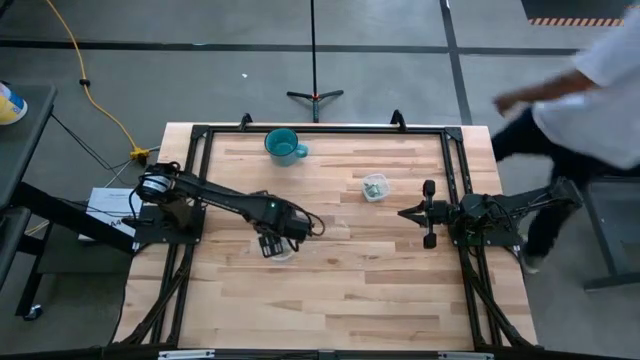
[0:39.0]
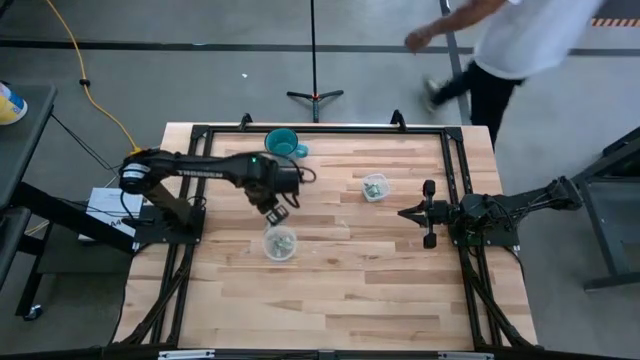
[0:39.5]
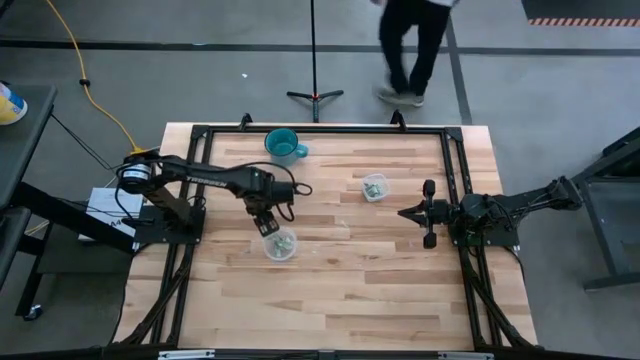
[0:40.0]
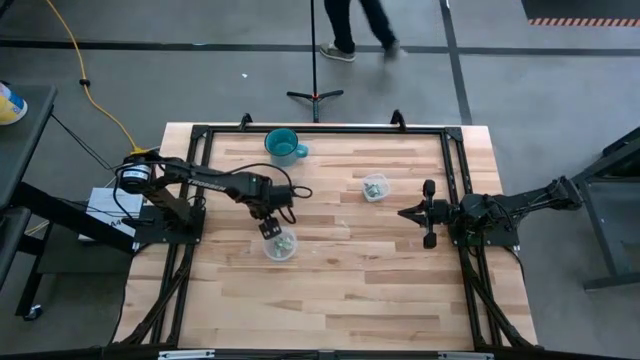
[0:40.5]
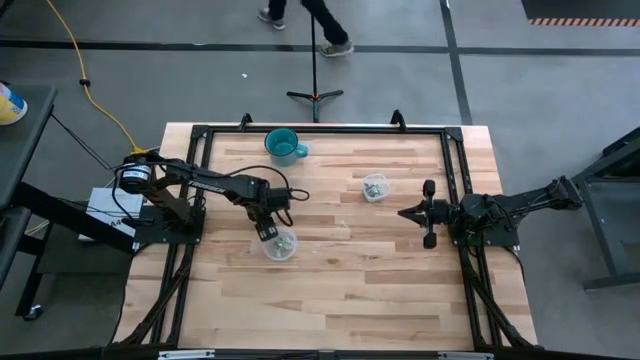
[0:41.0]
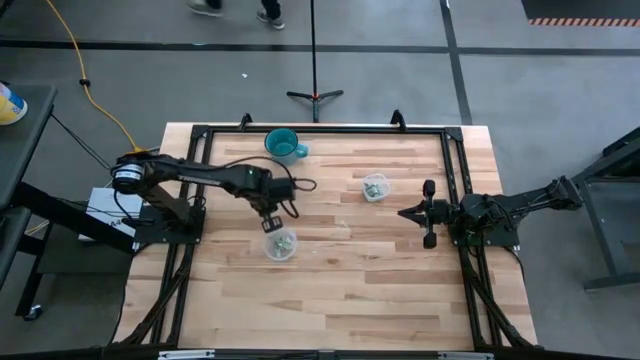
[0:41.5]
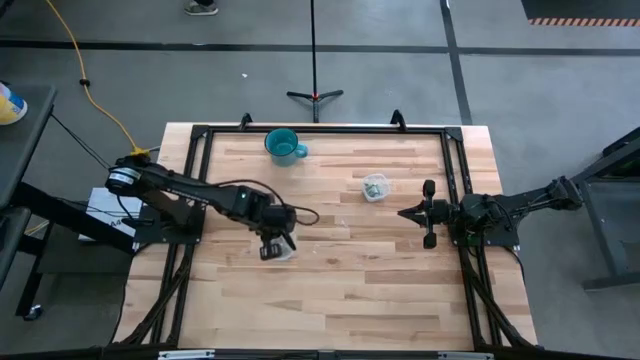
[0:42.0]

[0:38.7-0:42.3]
Task: Pick and place items into bin
Put the stevia packet into the left transparent bin

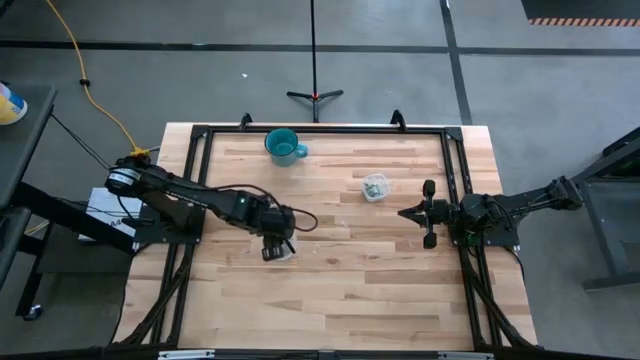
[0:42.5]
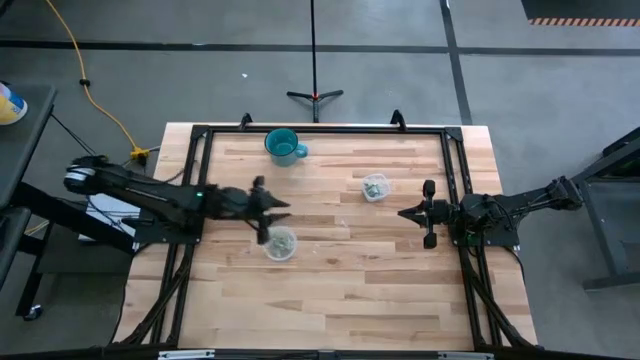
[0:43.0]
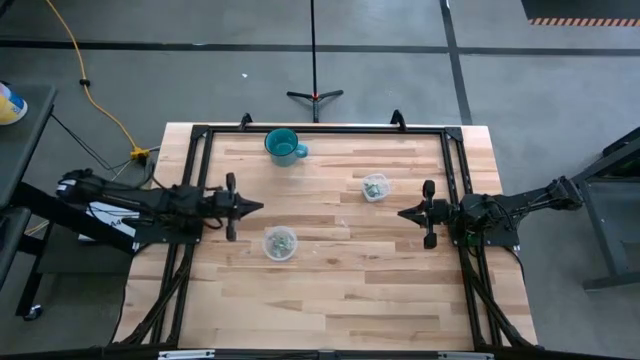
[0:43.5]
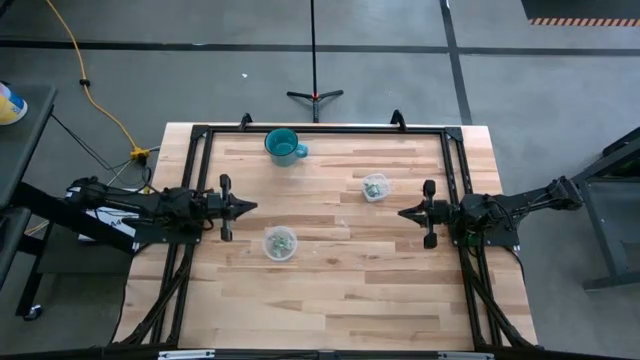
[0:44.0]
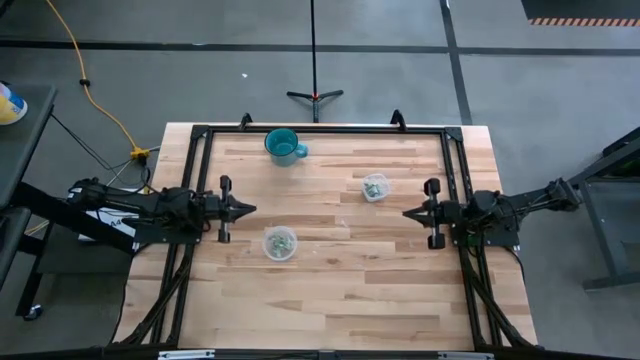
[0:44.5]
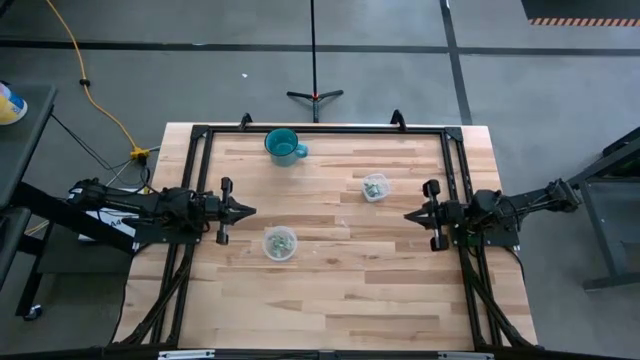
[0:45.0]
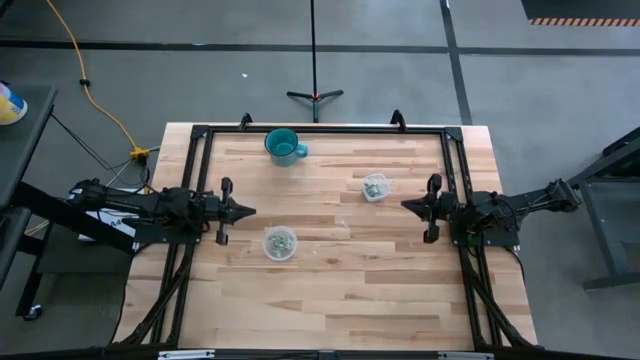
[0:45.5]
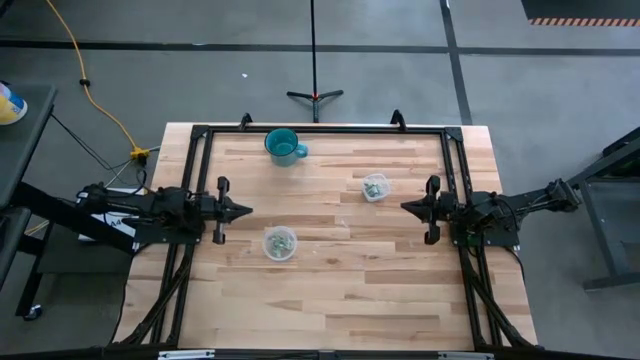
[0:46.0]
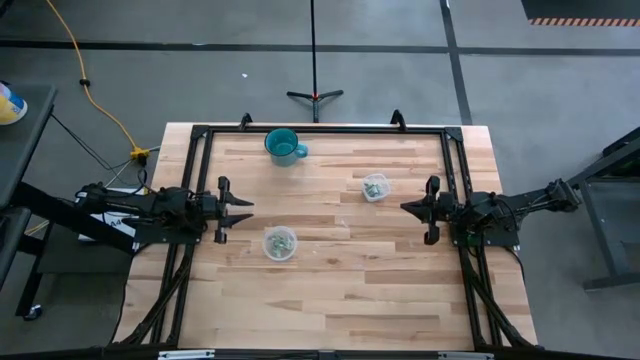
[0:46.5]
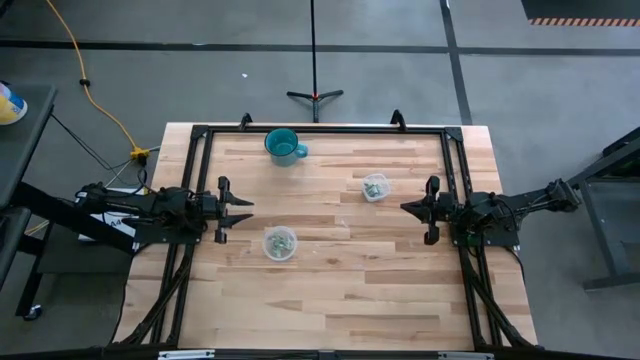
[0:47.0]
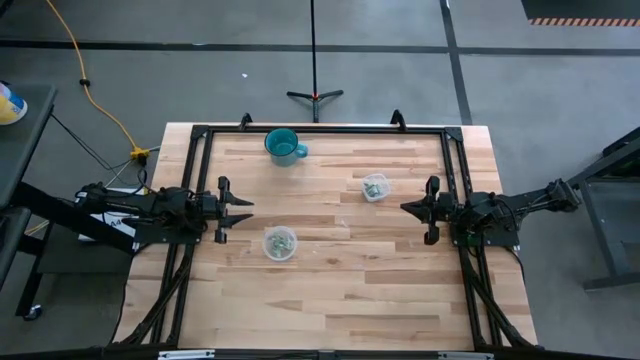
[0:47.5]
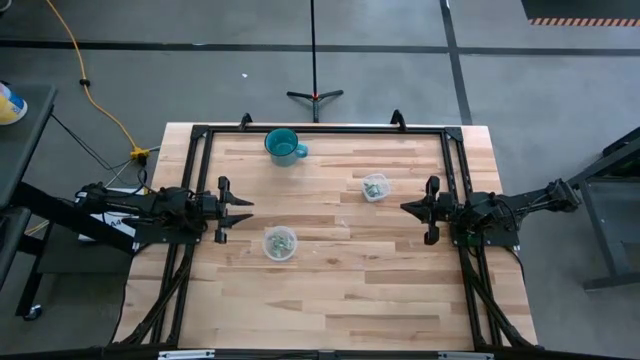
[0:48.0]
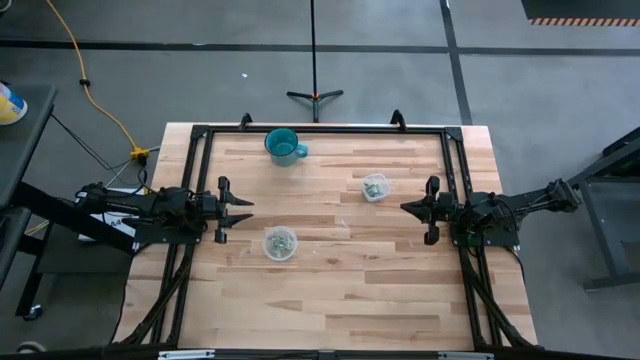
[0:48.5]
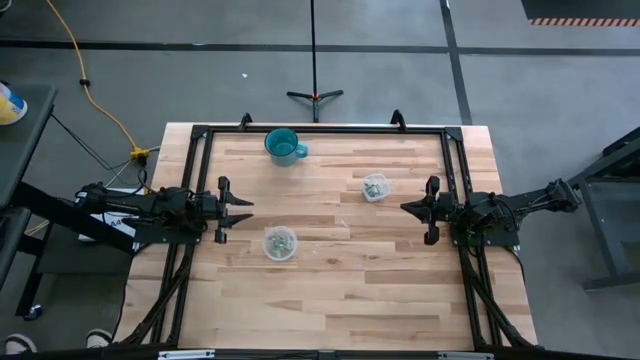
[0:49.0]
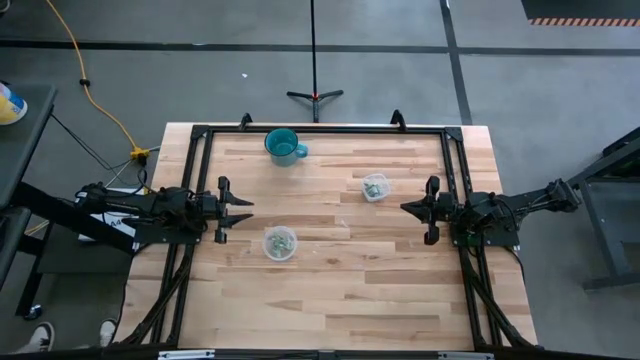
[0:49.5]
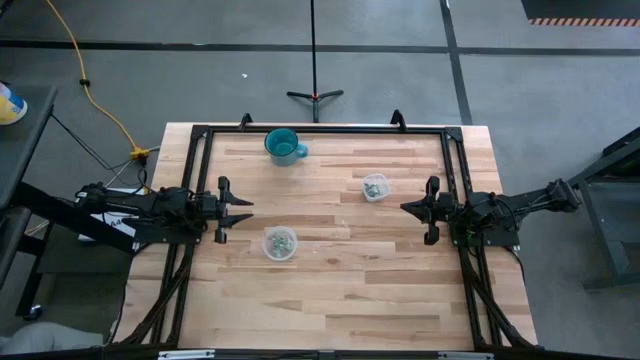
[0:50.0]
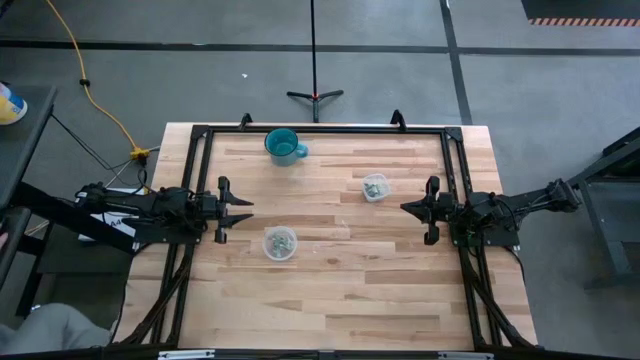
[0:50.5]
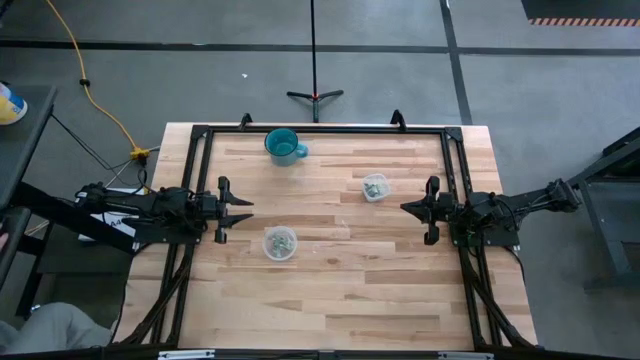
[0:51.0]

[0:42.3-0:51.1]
Return to Home Position

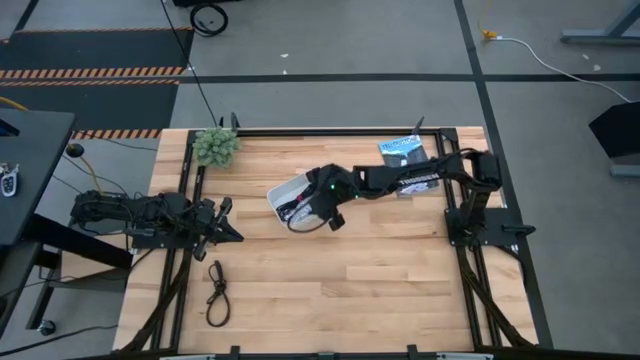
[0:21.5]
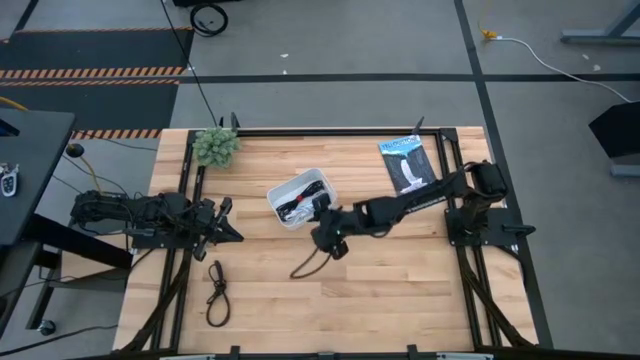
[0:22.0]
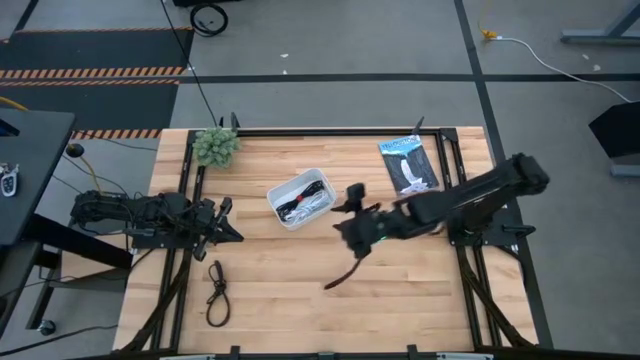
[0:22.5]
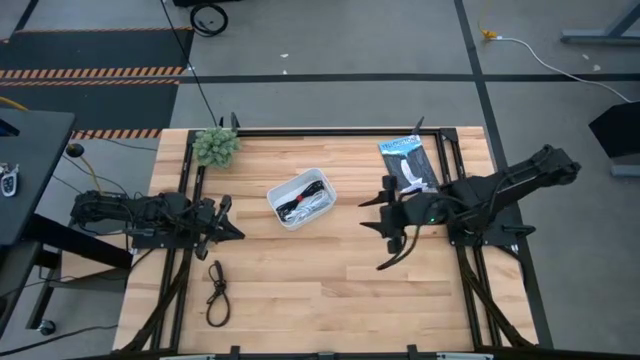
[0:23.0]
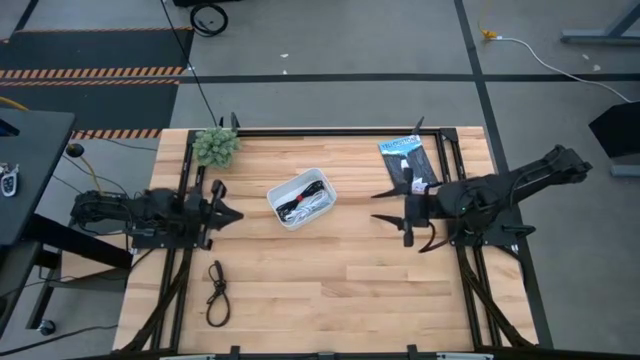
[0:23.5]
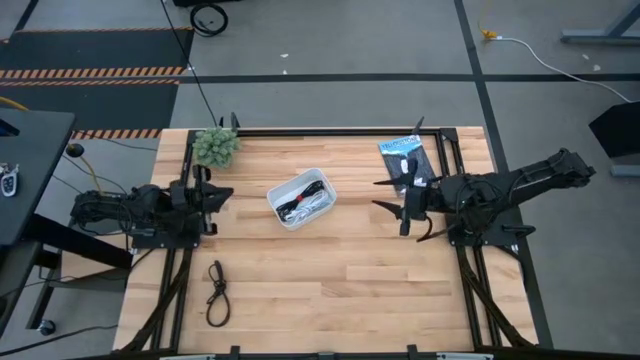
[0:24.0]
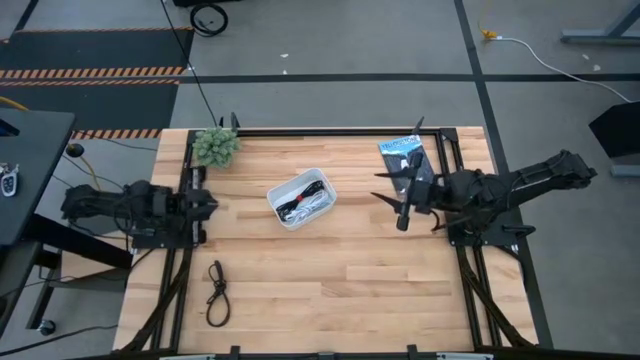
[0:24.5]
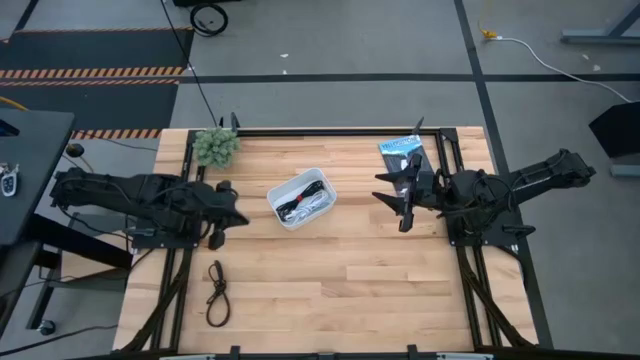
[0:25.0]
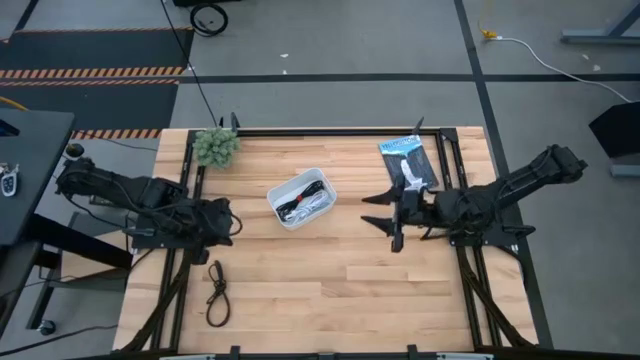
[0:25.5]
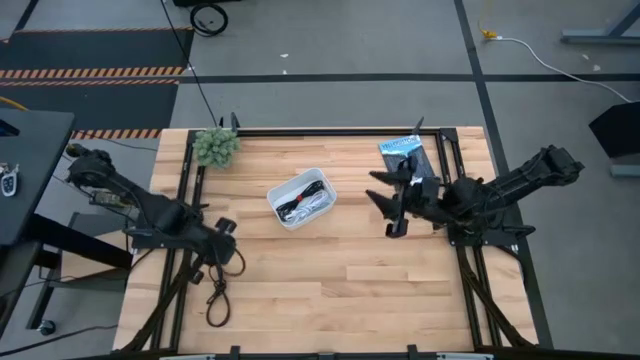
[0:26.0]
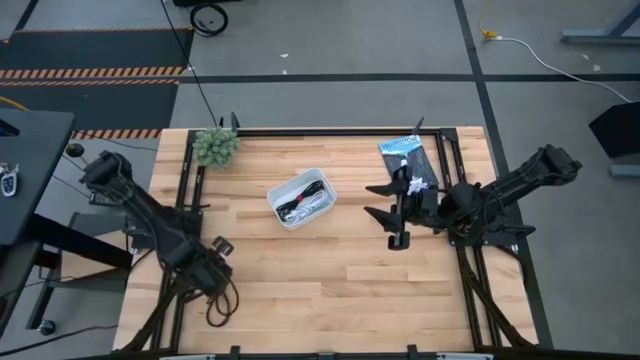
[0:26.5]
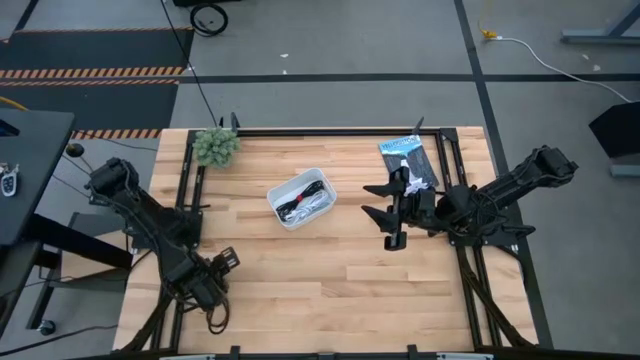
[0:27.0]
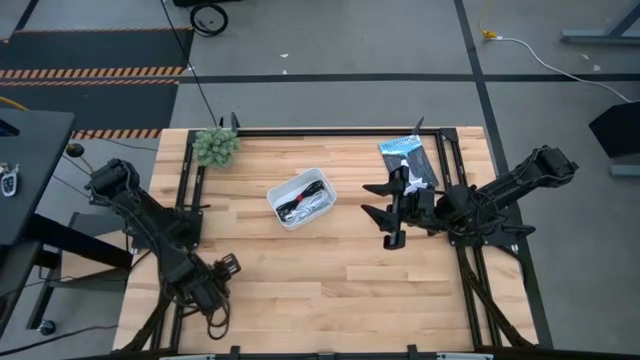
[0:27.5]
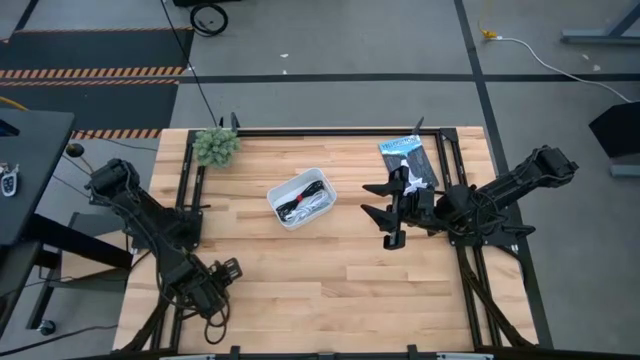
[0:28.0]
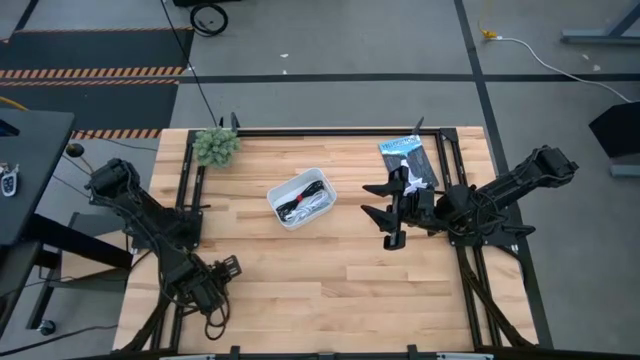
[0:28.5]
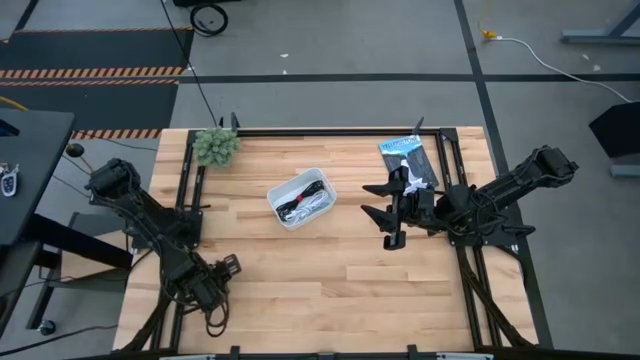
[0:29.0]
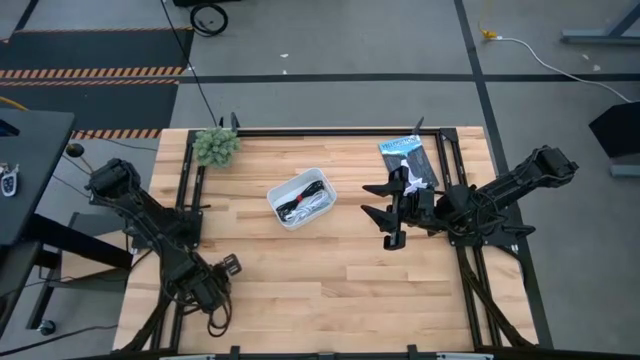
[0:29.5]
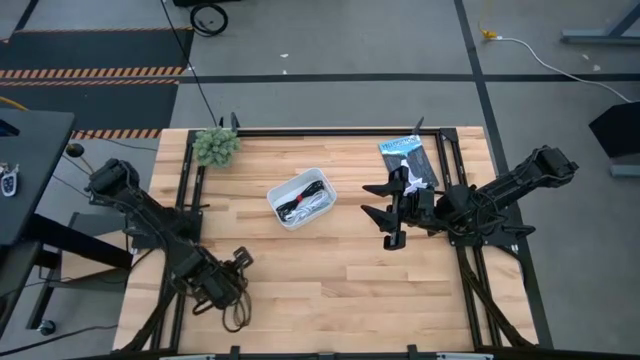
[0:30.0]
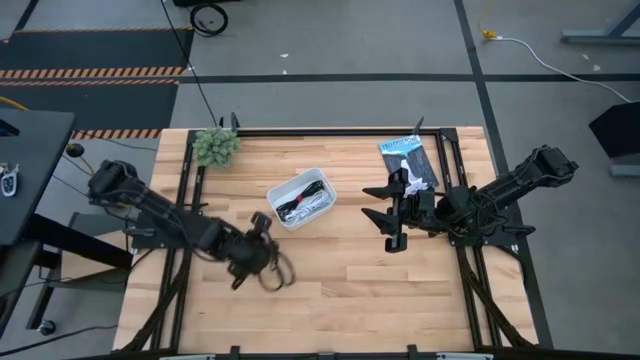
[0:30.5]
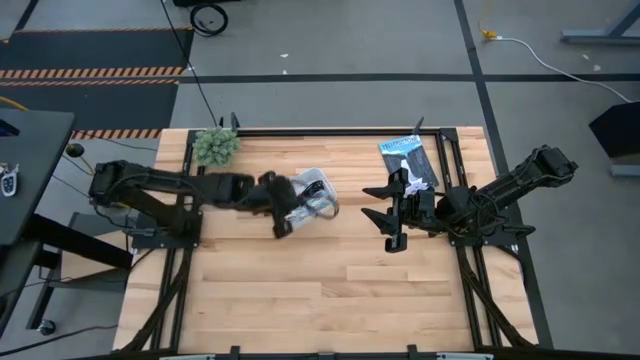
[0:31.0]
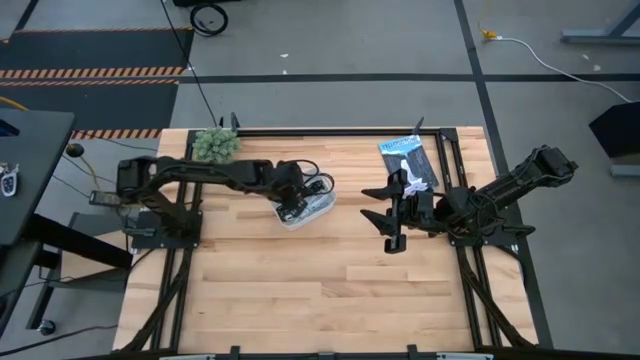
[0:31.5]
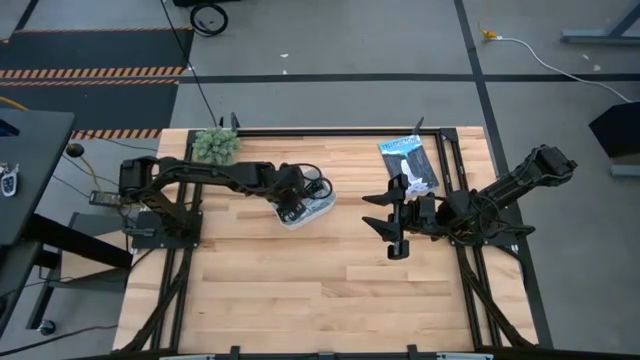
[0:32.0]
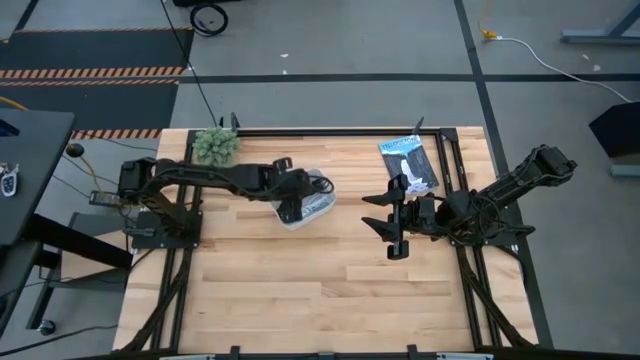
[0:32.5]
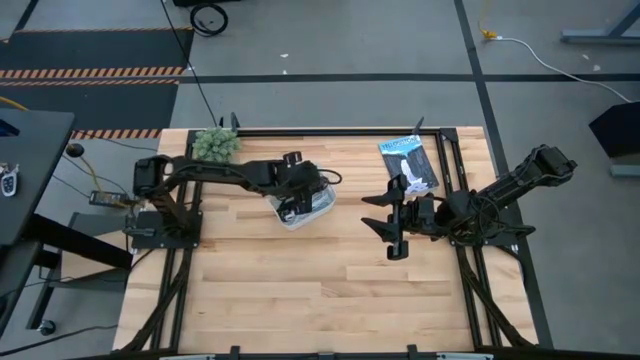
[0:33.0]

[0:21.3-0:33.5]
Task: Pick and place USB-C Cables
Put the black cable charger into the white bin
